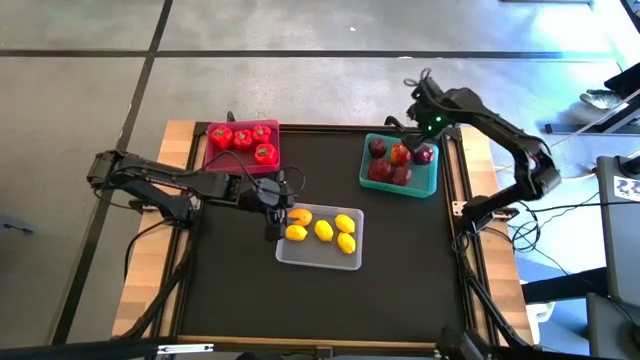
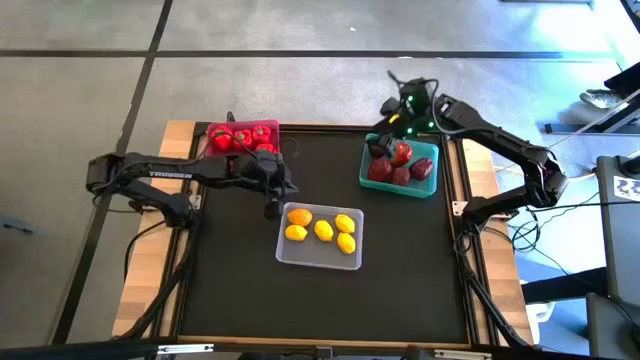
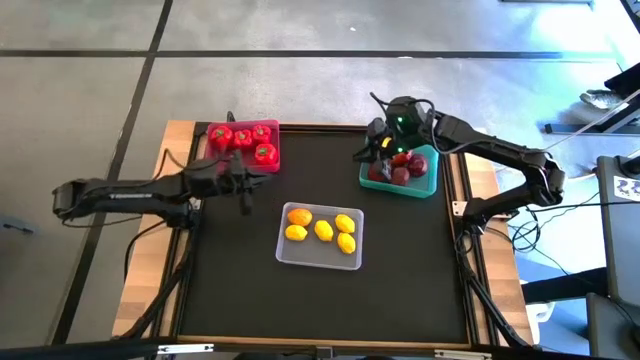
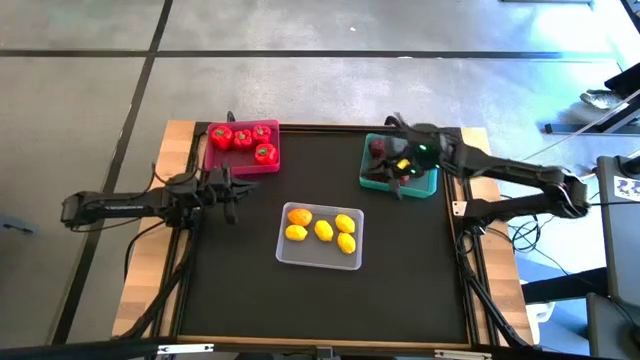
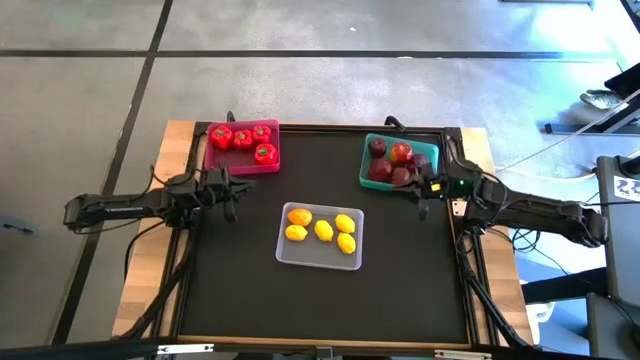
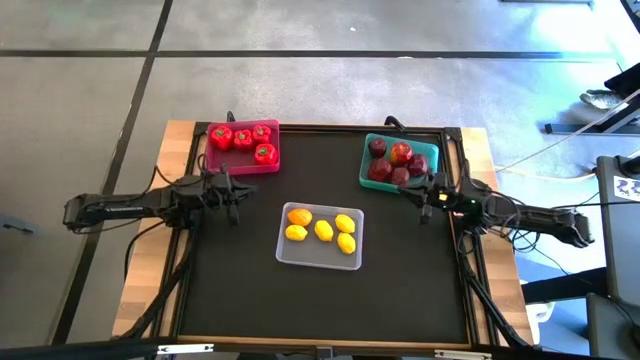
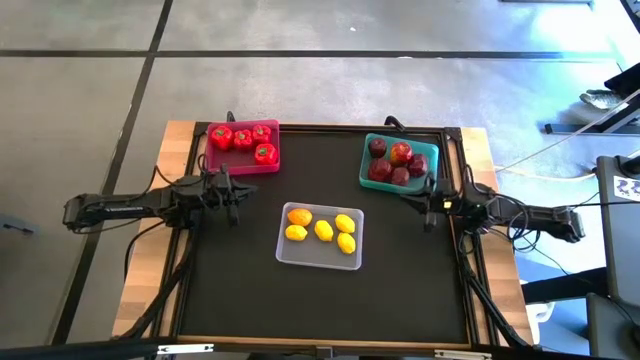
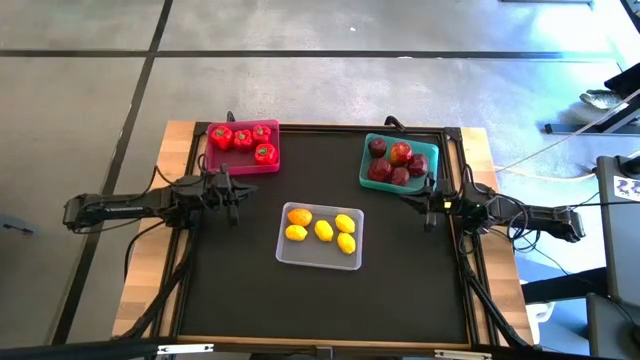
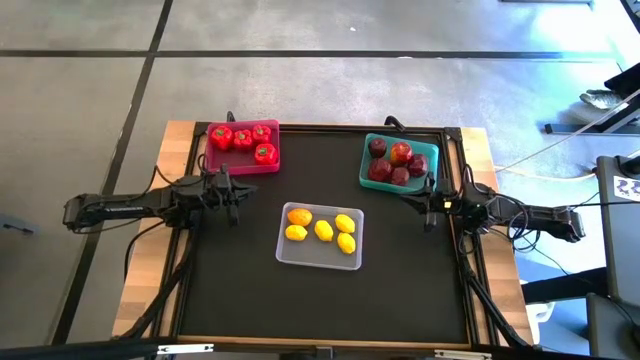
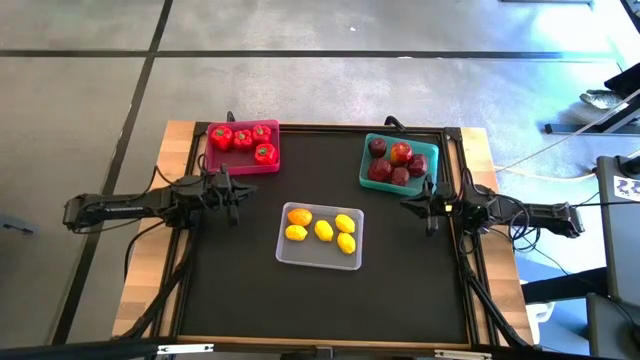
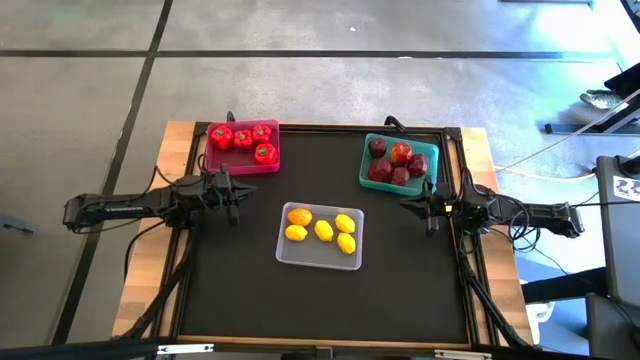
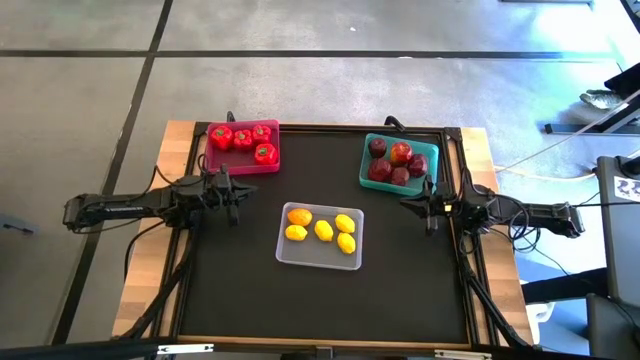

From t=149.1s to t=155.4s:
Task: Sort produce into baskets
Return to Home Position

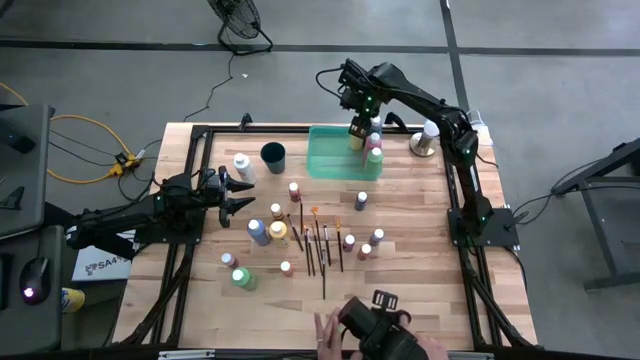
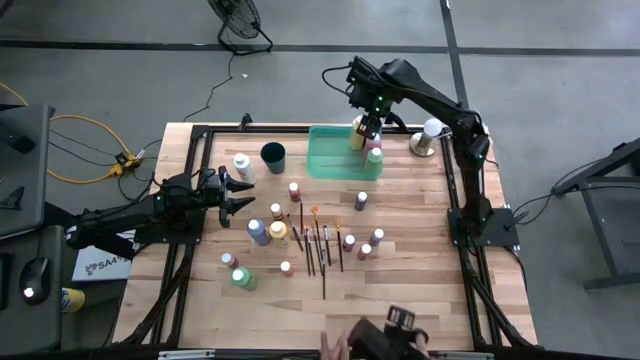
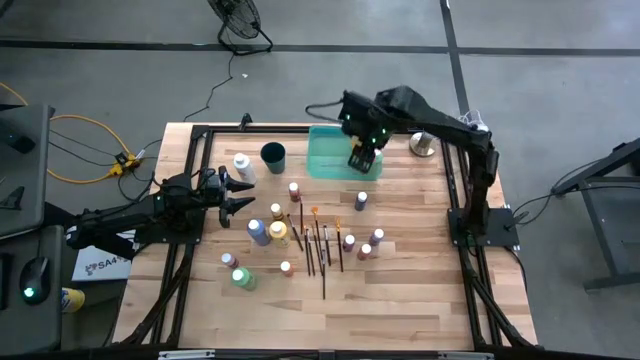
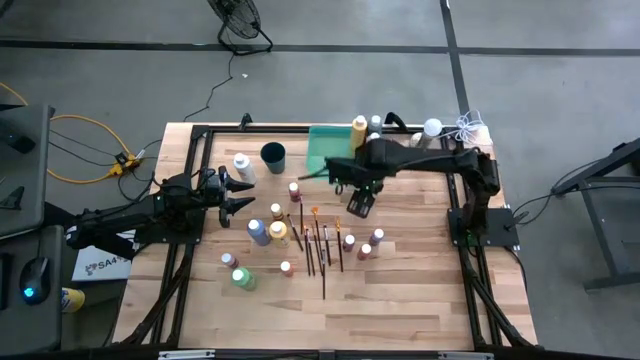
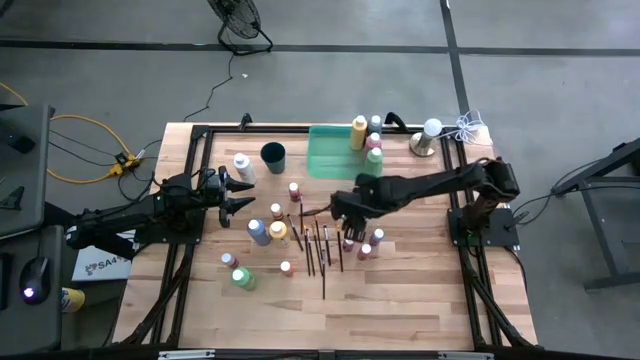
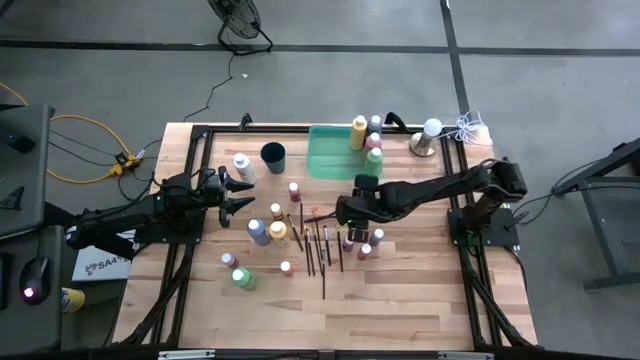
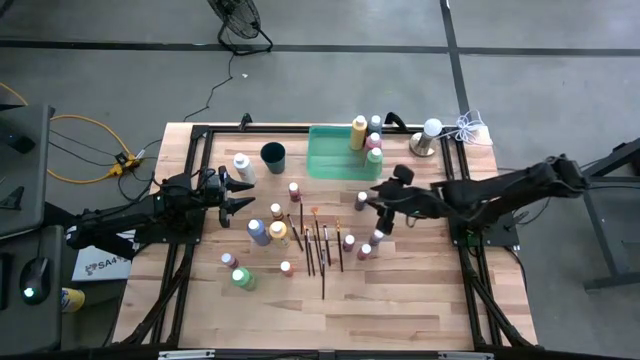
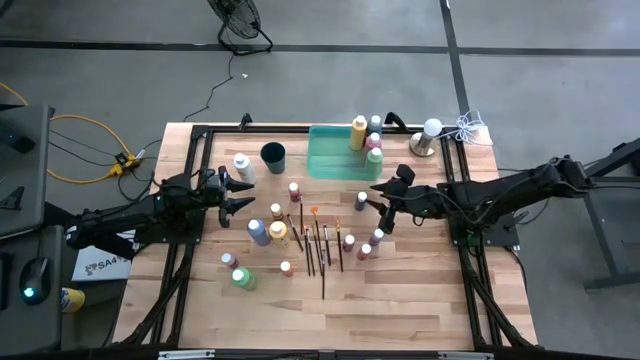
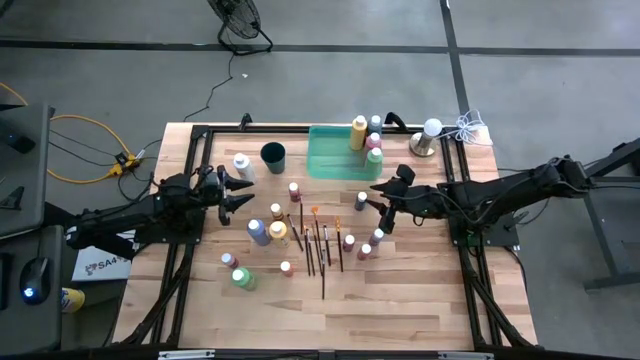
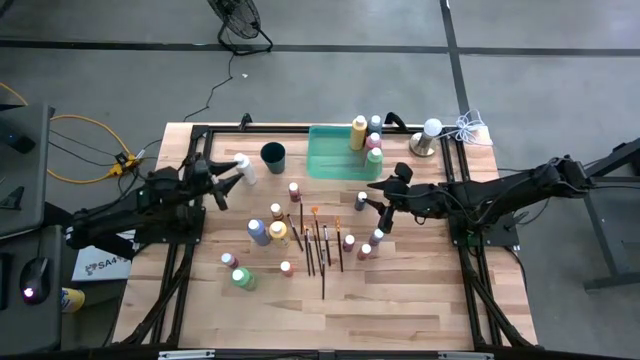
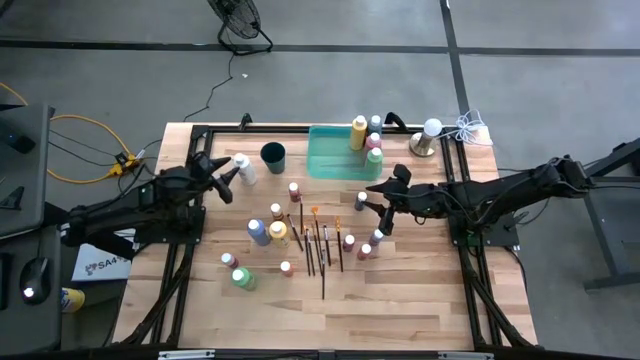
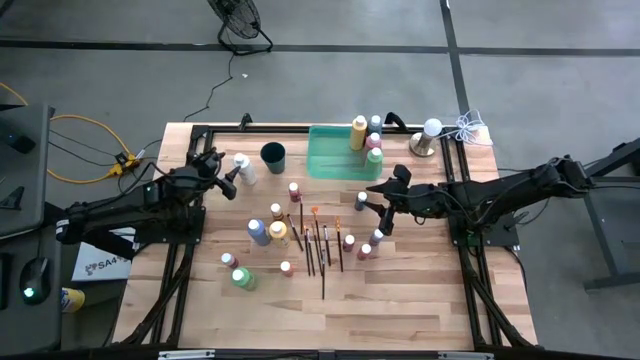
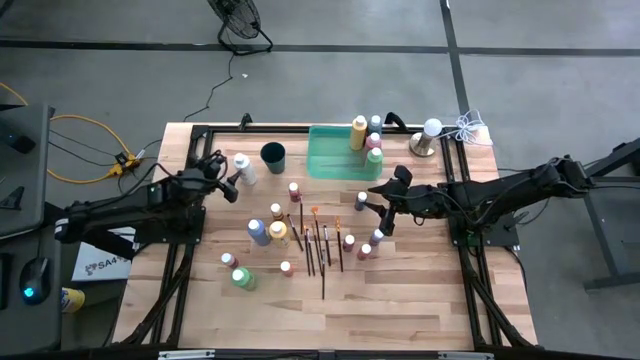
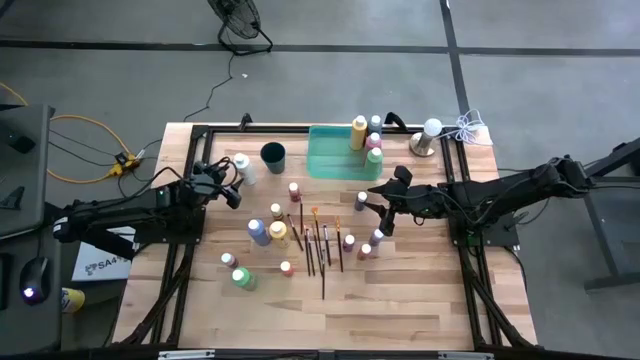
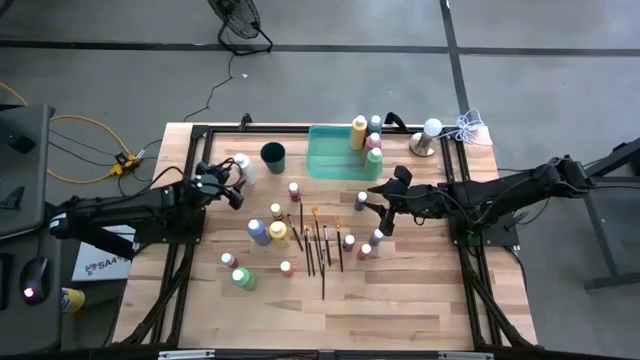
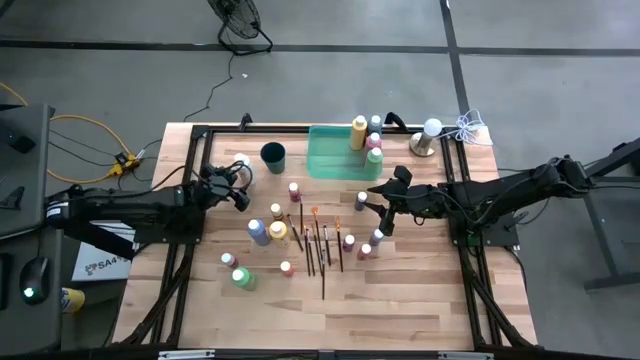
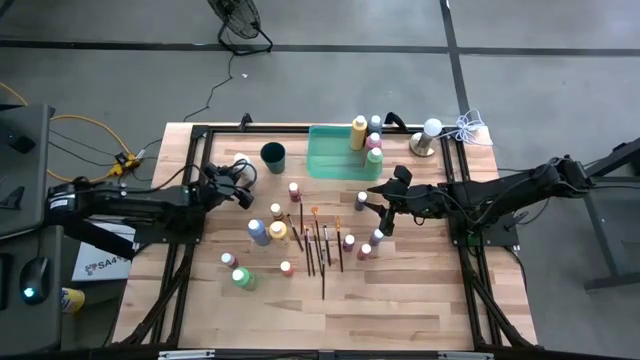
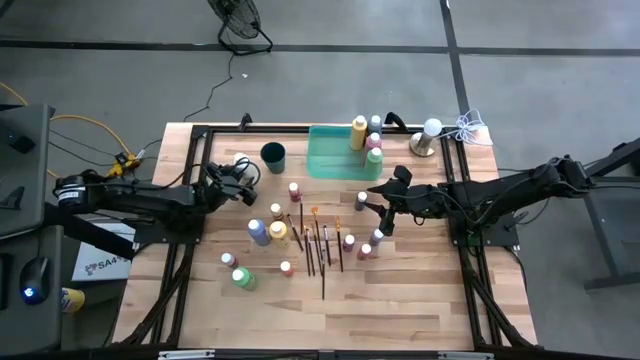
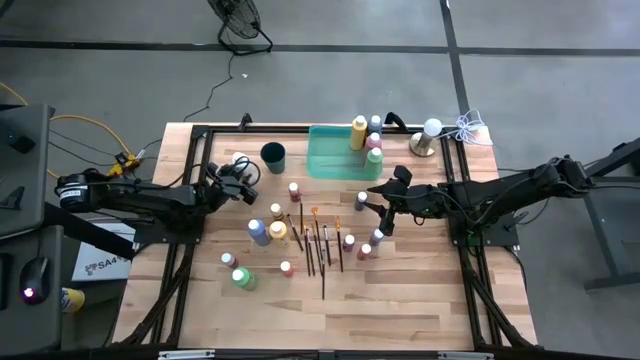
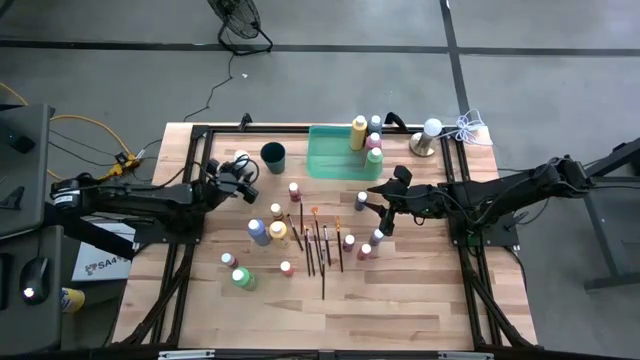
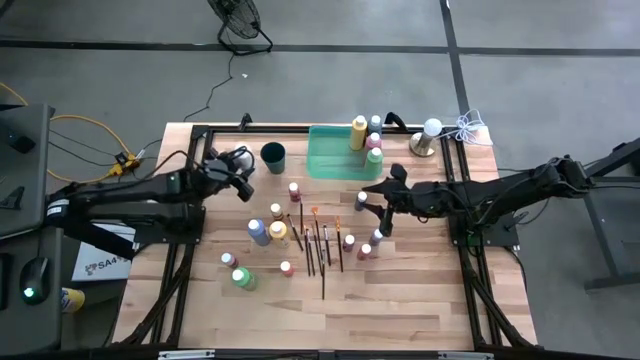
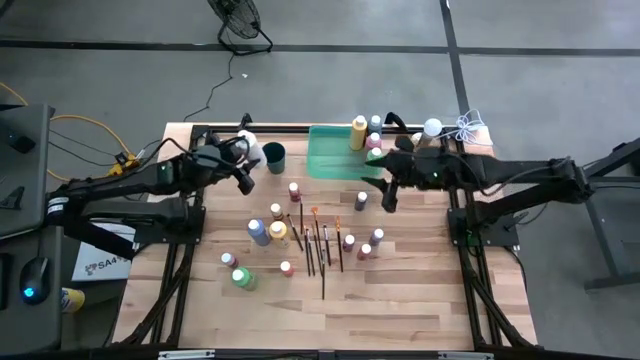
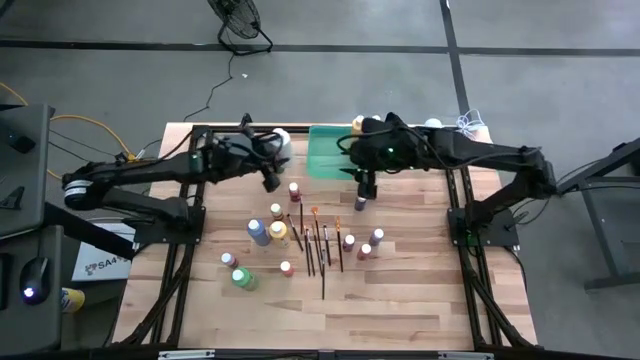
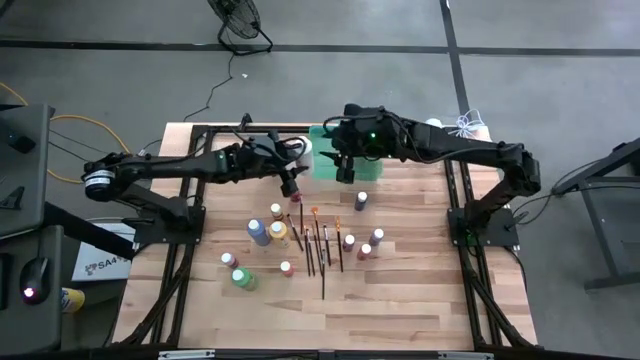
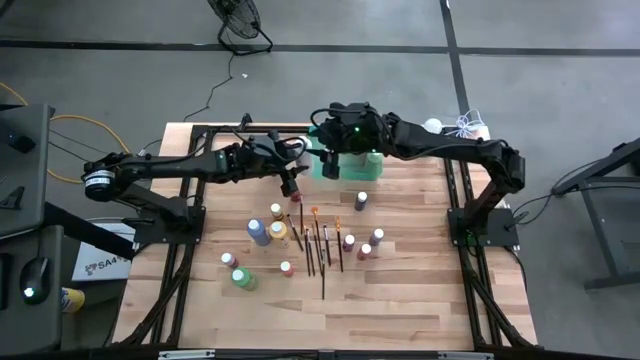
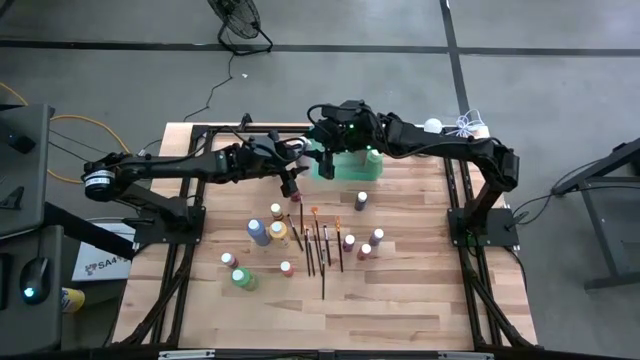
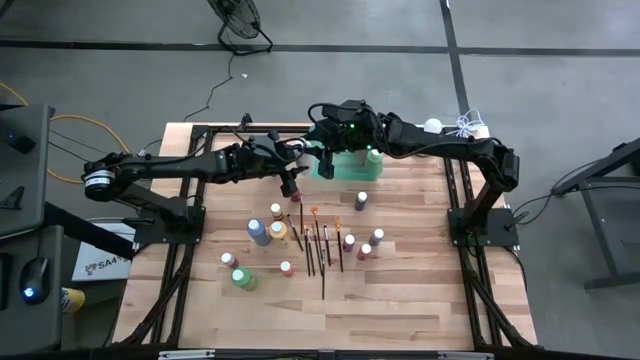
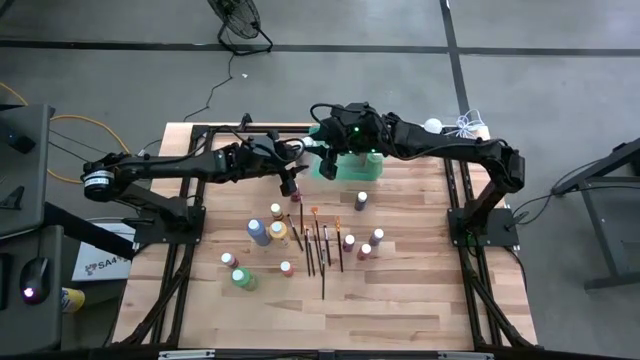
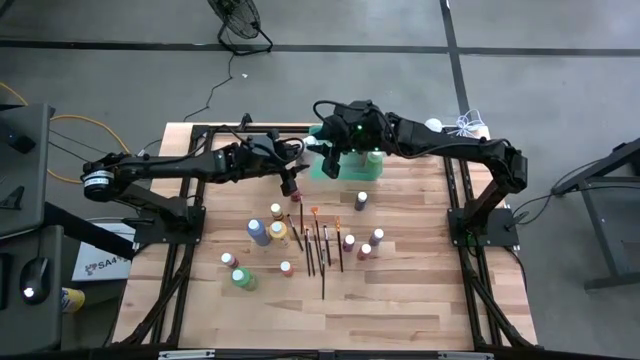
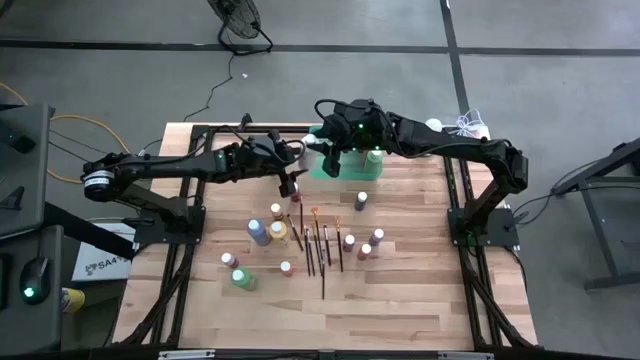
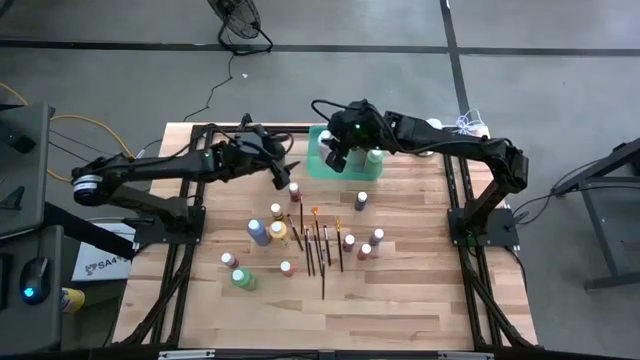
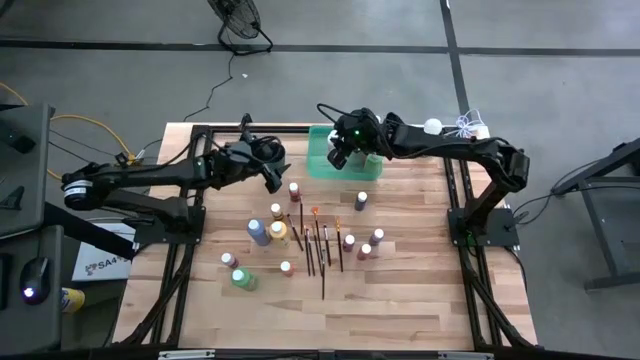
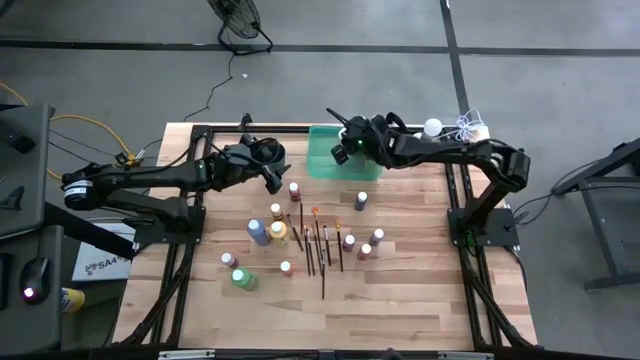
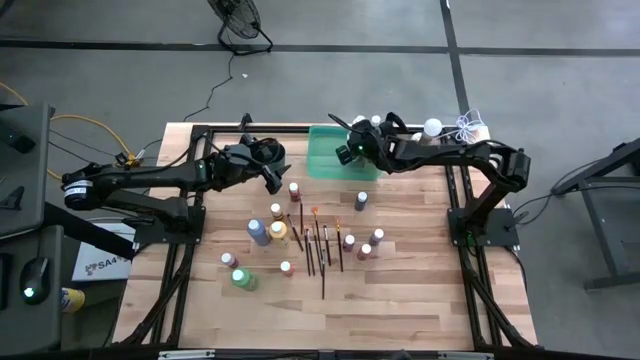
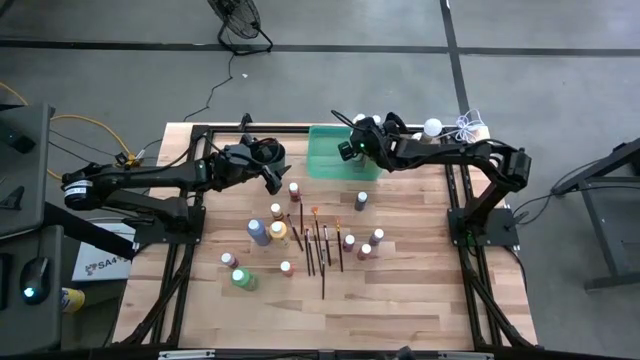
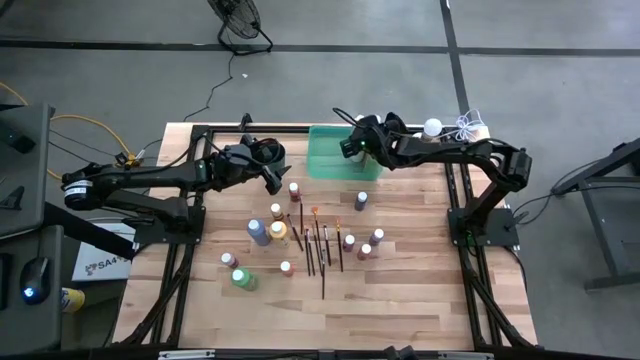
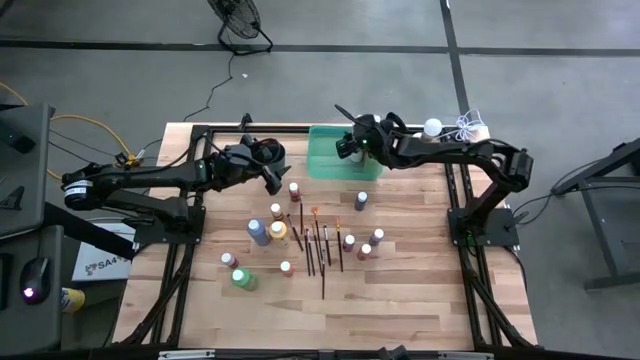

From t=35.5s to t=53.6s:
Task: Pick & Place Paint Supplies
Put the large white paint bottle into the green bin
